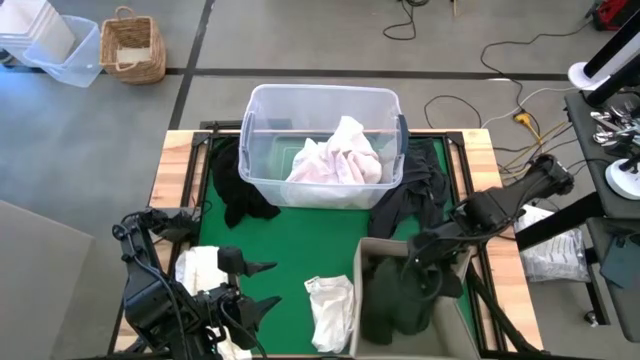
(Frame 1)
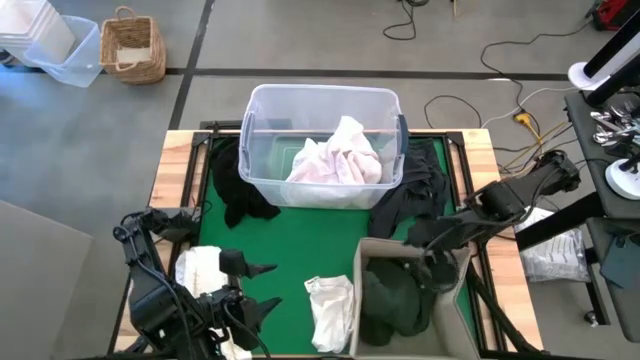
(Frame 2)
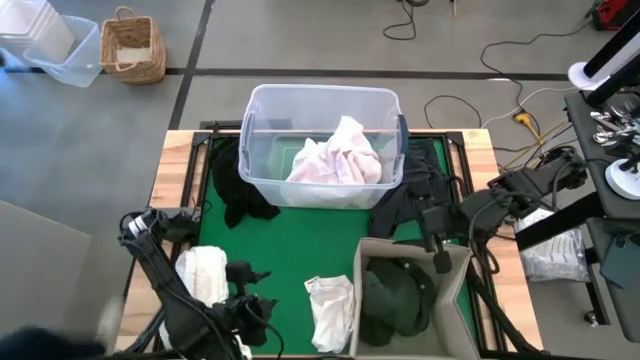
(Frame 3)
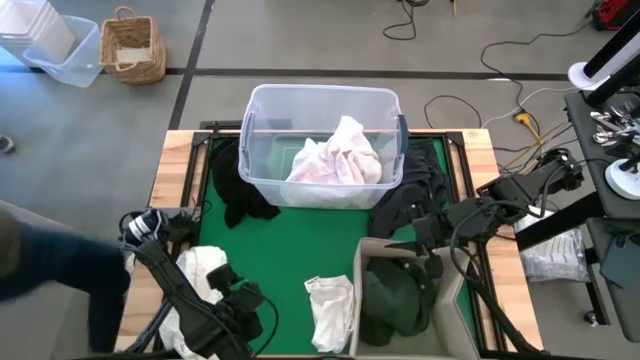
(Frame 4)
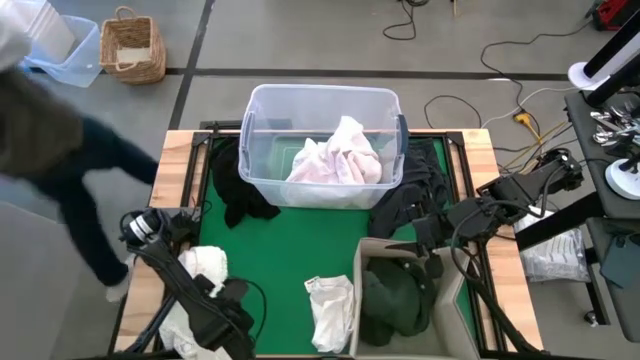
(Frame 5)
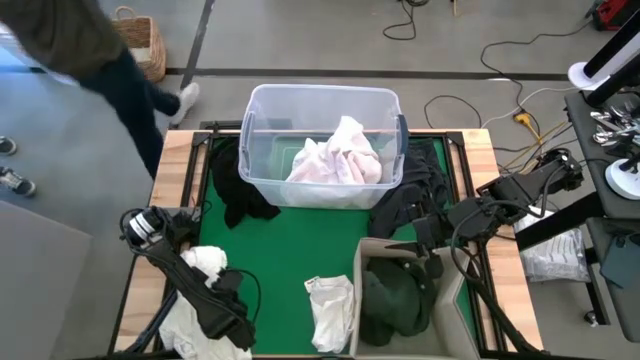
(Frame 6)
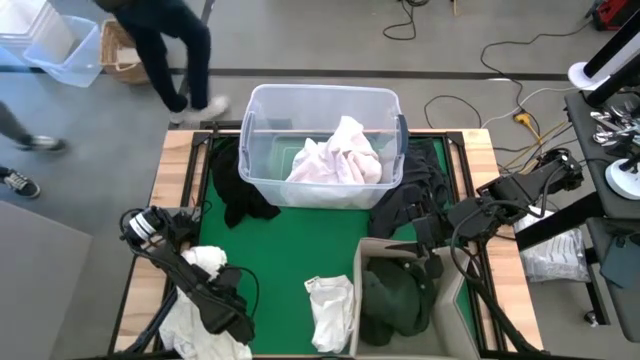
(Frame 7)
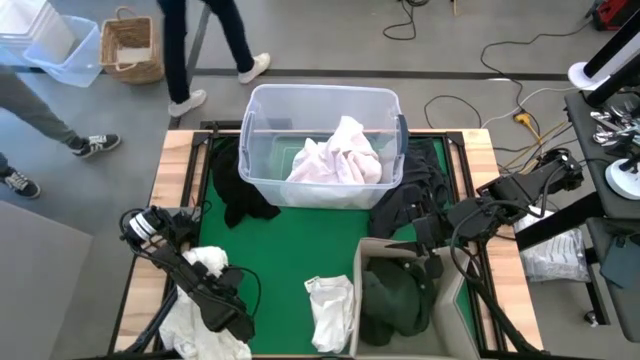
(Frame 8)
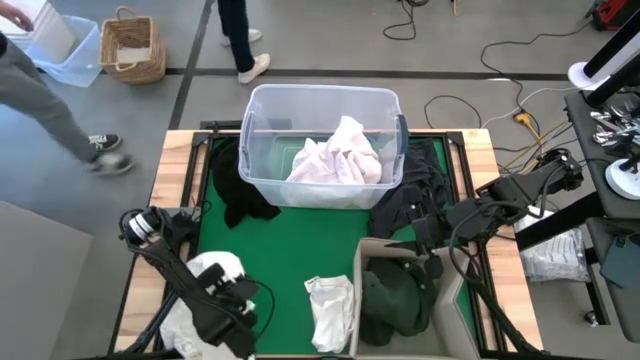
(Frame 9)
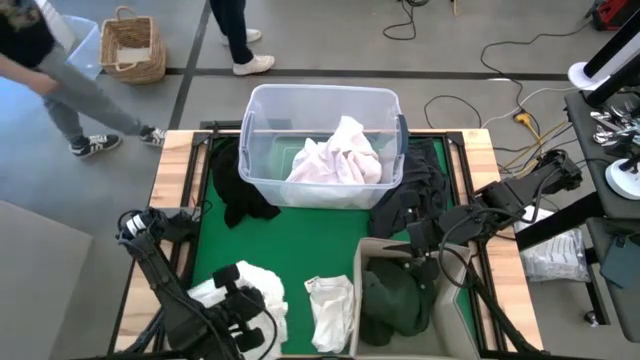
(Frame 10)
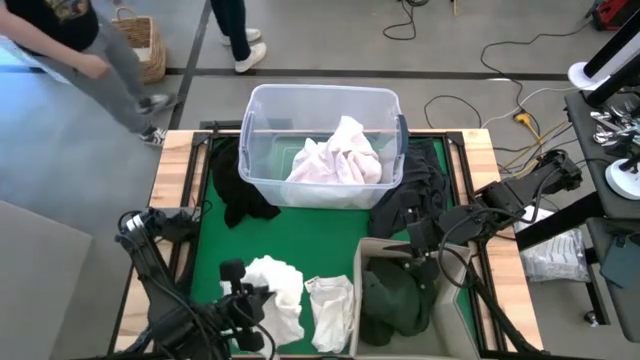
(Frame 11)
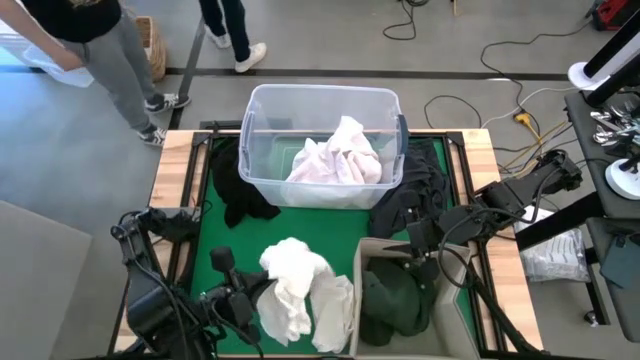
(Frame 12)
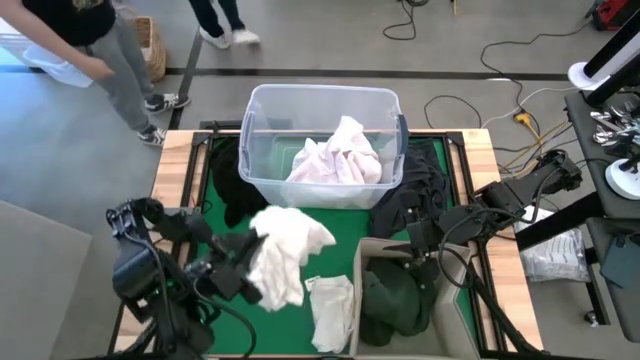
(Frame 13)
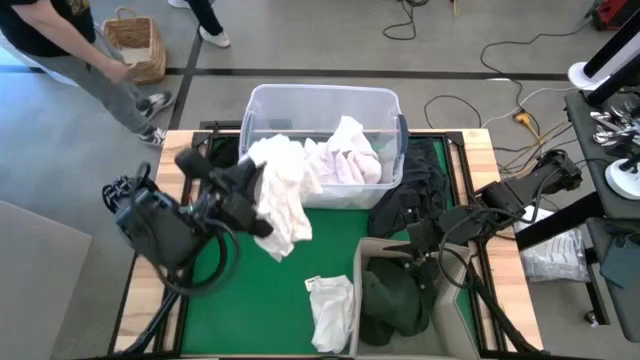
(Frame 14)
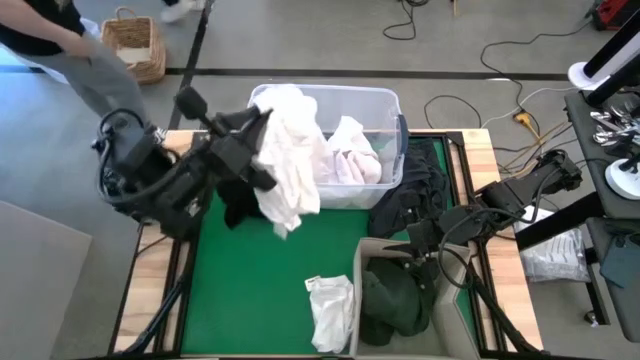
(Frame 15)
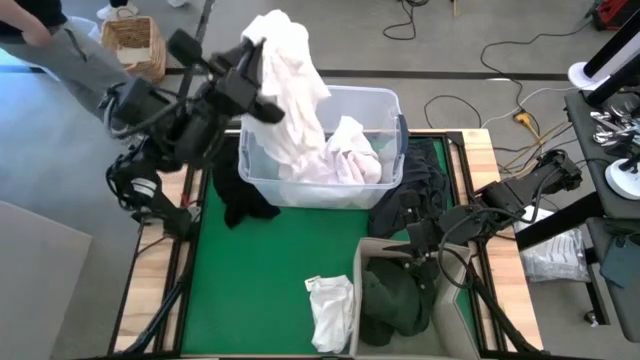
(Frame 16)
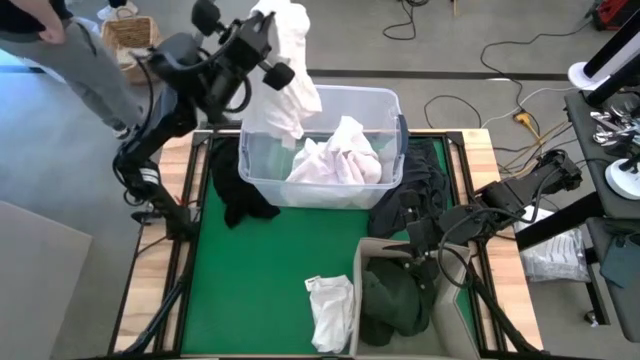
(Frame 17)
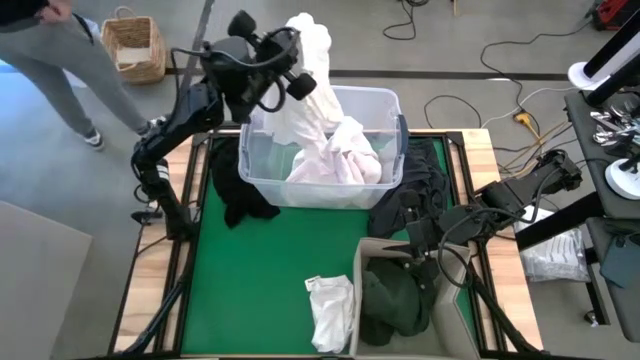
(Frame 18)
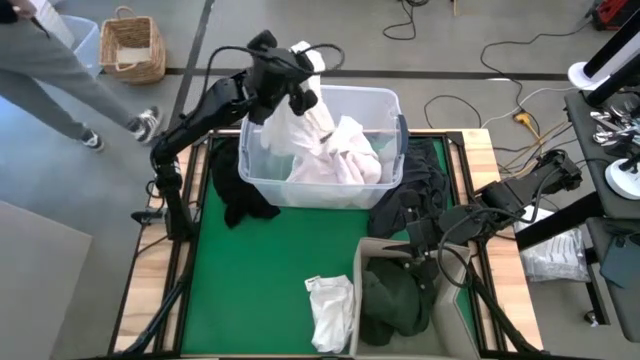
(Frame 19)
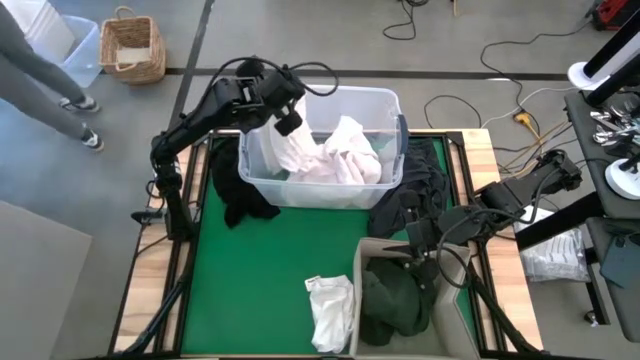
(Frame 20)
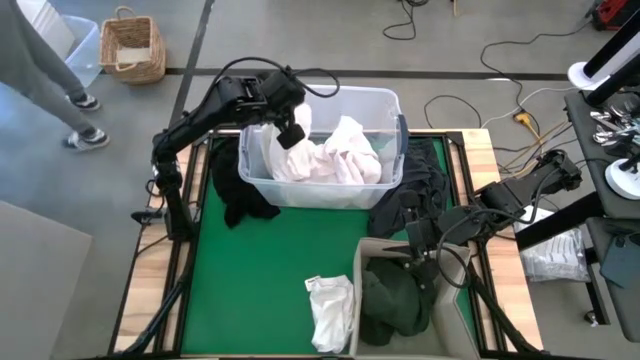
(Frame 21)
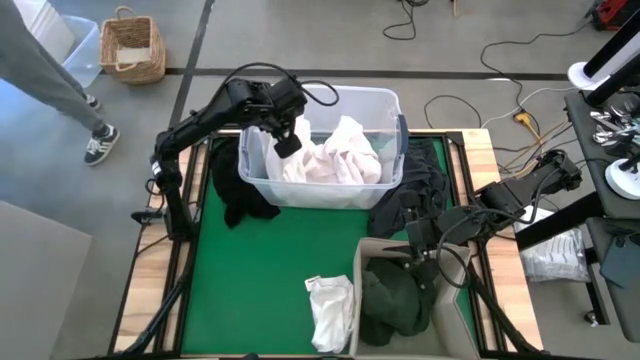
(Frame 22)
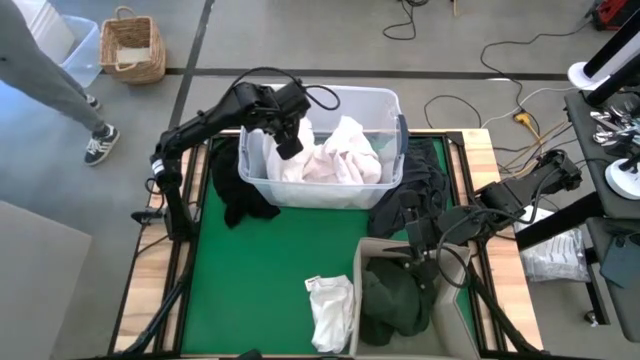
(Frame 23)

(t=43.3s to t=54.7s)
Put the white shirt into the transparent laundry bin

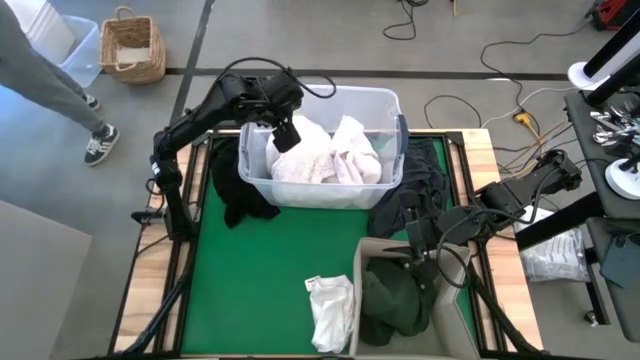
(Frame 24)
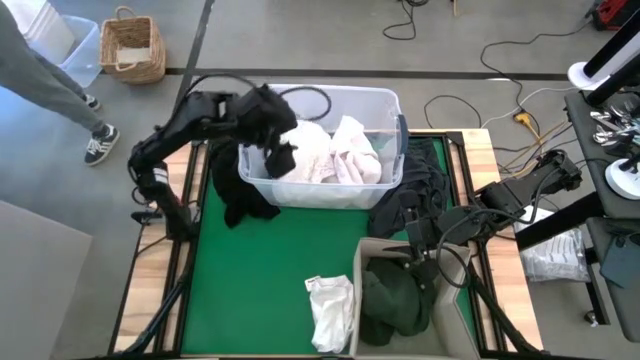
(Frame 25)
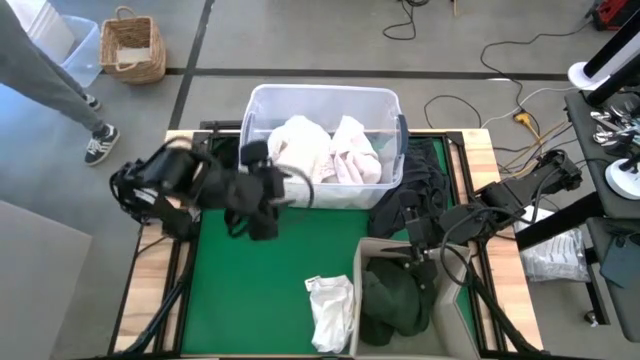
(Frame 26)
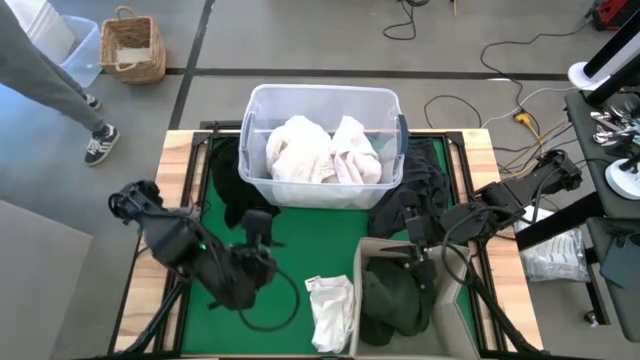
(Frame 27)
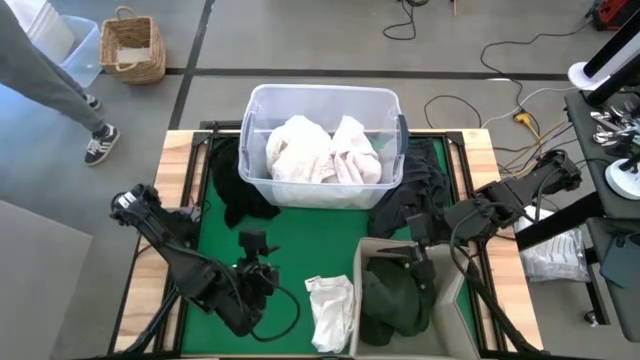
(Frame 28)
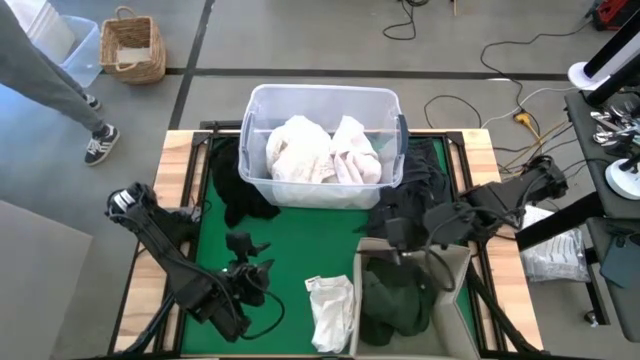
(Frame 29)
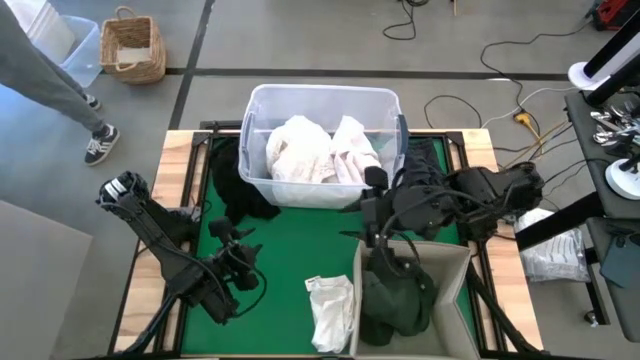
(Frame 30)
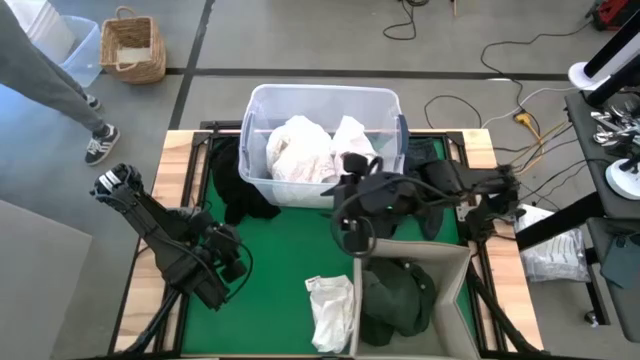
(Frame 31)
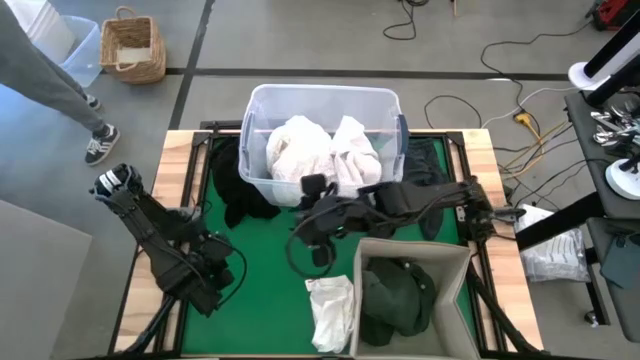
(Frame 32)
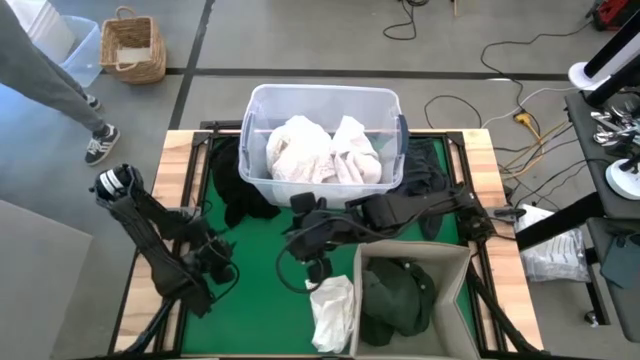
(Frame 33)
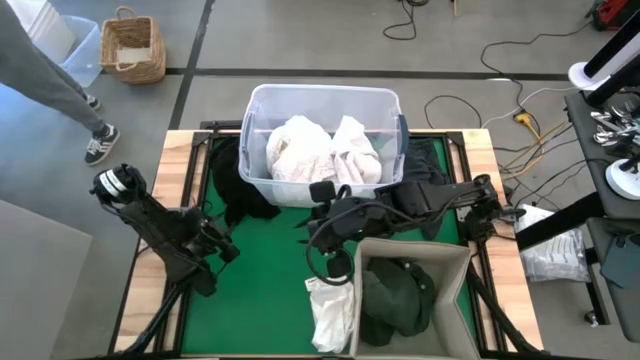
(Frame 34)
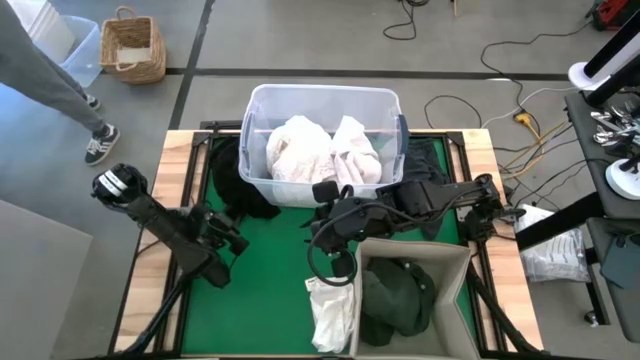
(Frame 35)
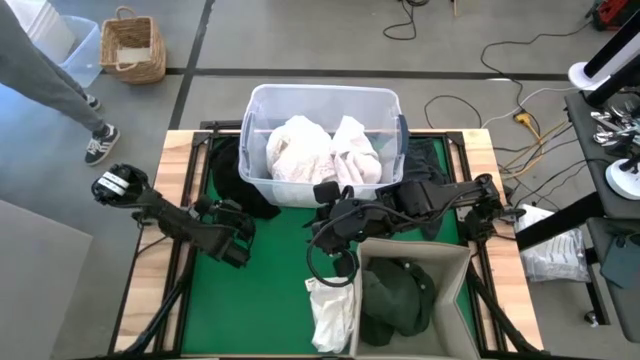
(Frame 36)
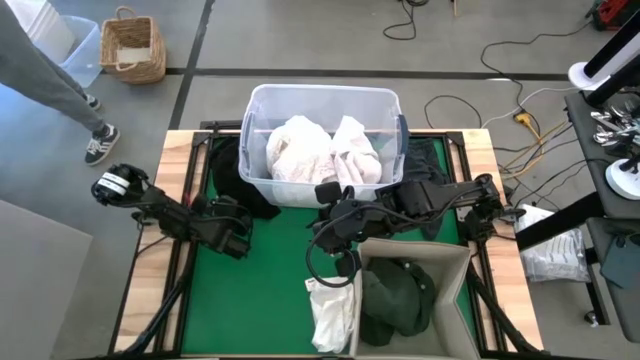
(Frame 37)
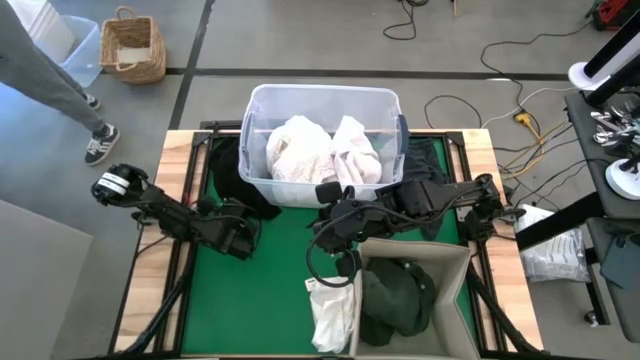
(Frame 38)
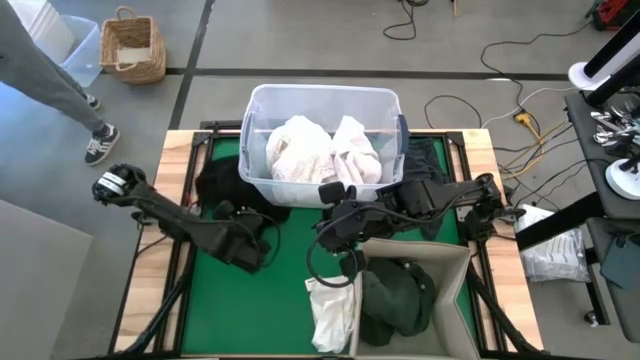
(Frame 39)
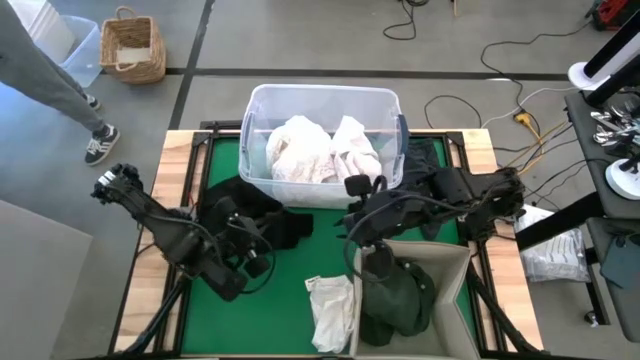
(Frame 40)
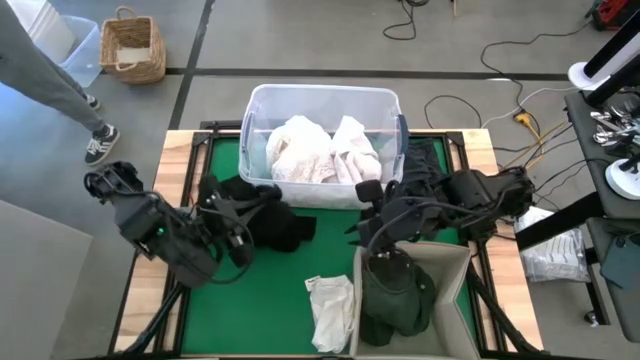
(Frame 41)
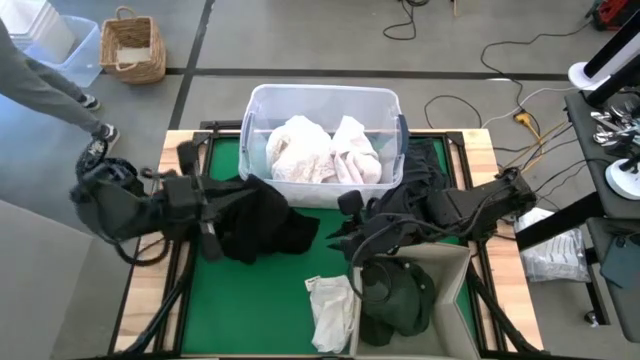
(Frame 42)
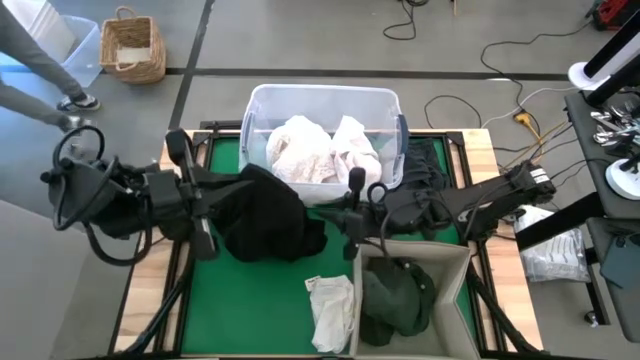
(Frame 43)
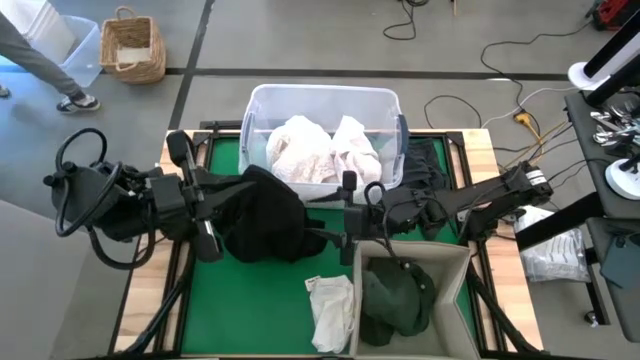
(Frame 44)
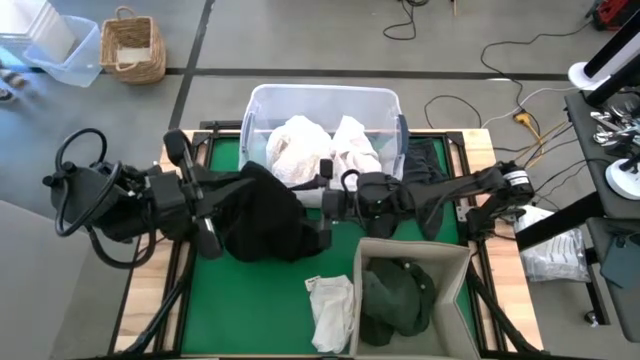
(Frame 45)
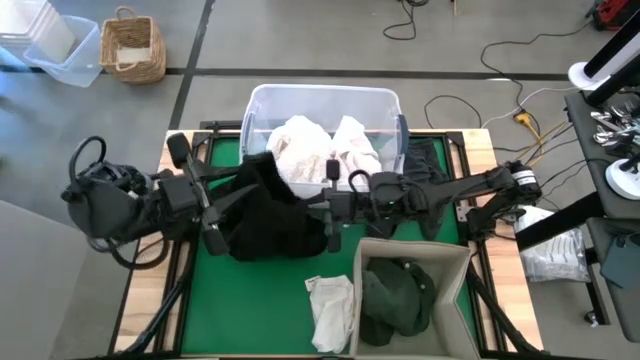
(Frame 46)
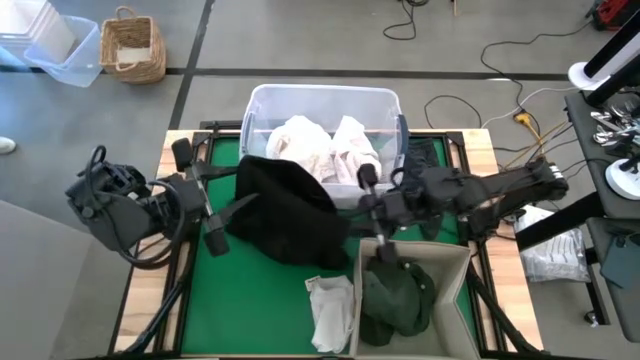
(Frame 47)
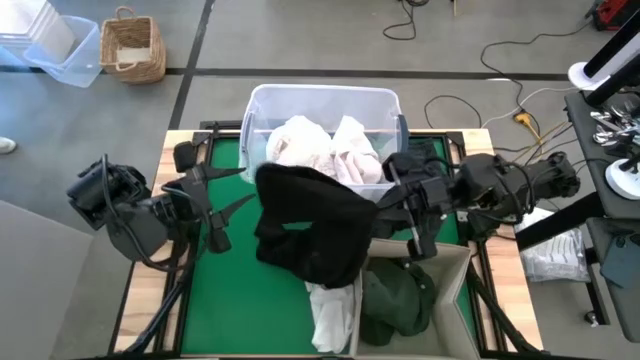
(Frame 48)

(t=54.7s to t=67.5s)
Put the black pants into the brown laundry bin
